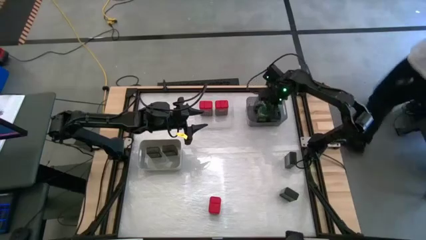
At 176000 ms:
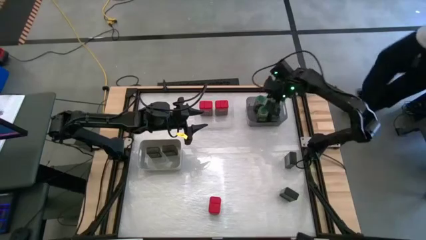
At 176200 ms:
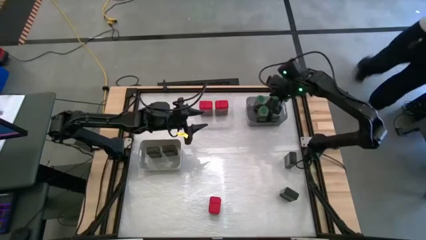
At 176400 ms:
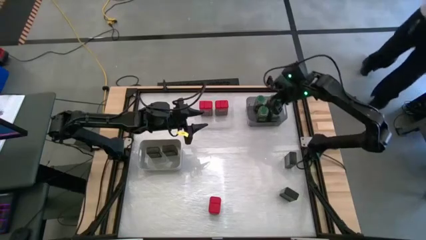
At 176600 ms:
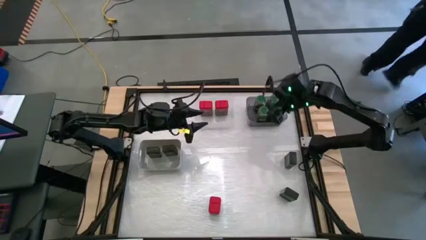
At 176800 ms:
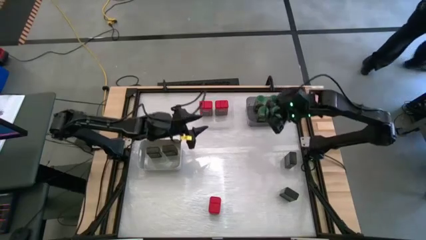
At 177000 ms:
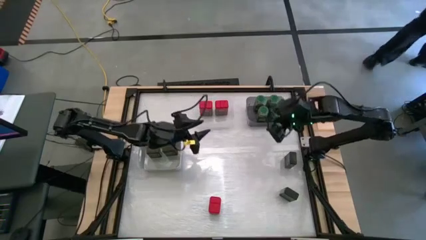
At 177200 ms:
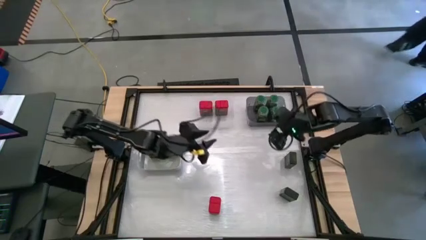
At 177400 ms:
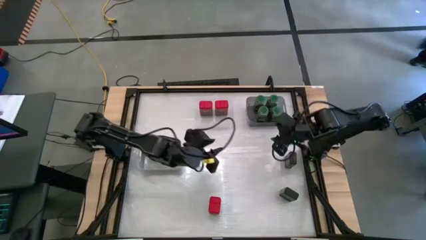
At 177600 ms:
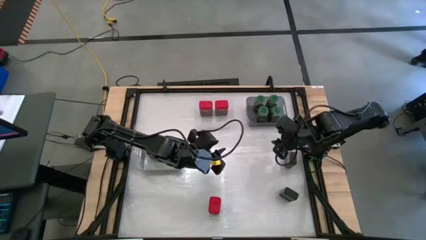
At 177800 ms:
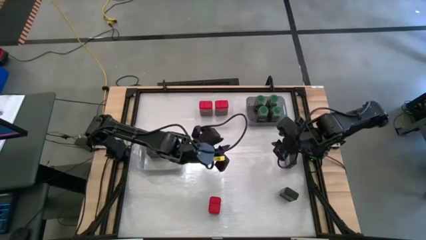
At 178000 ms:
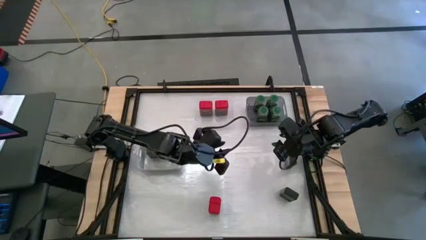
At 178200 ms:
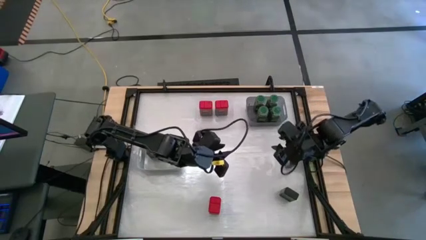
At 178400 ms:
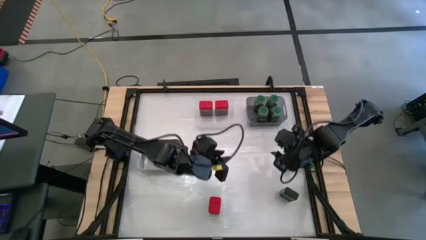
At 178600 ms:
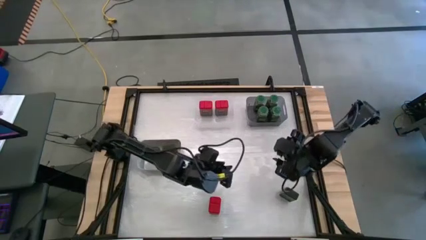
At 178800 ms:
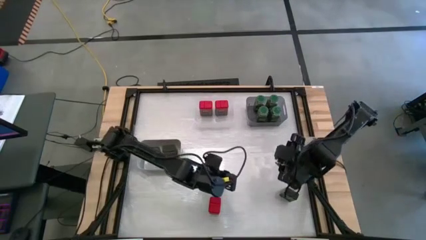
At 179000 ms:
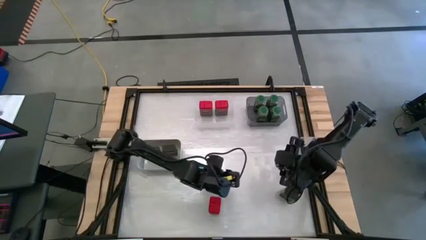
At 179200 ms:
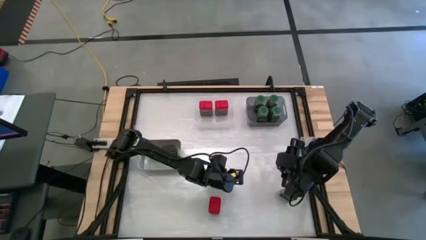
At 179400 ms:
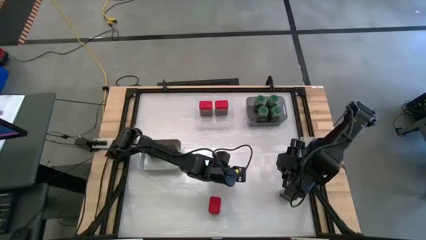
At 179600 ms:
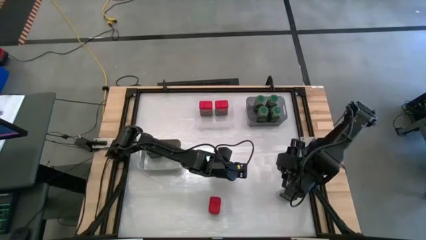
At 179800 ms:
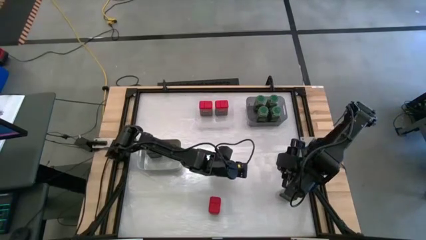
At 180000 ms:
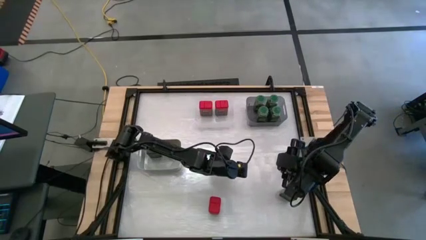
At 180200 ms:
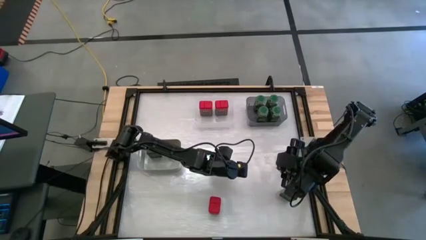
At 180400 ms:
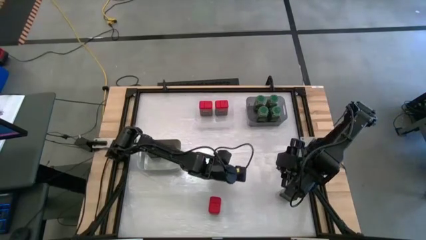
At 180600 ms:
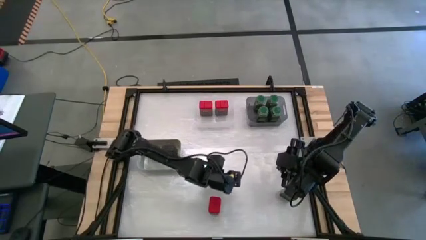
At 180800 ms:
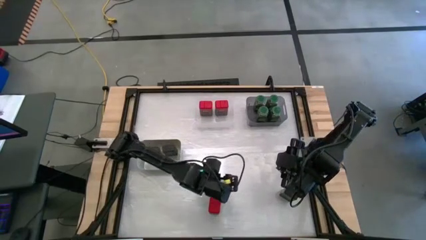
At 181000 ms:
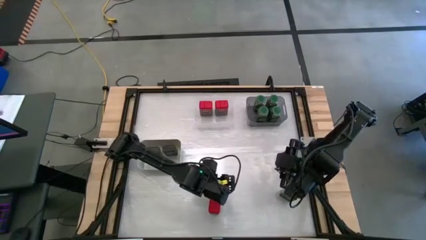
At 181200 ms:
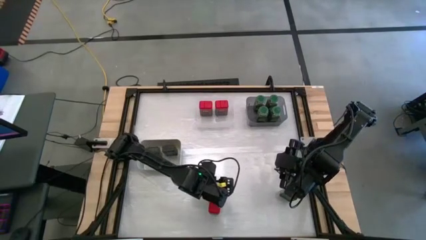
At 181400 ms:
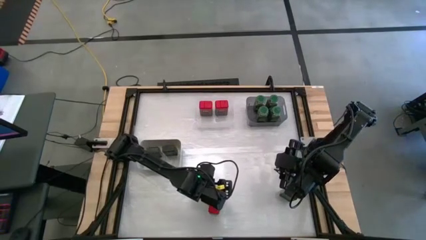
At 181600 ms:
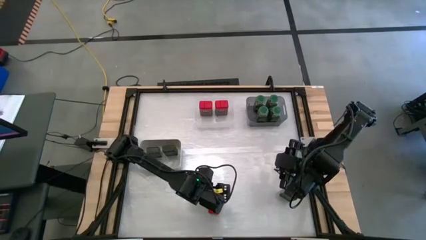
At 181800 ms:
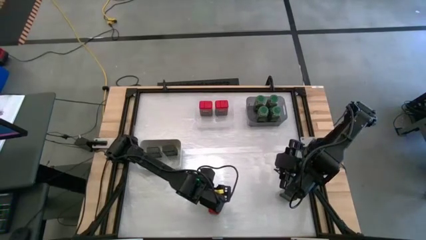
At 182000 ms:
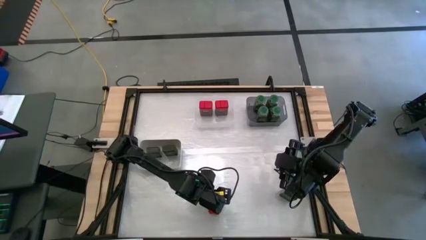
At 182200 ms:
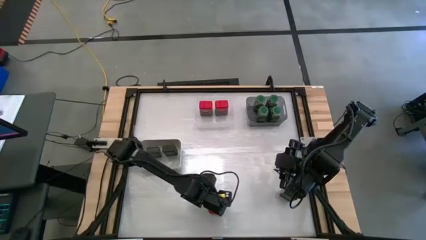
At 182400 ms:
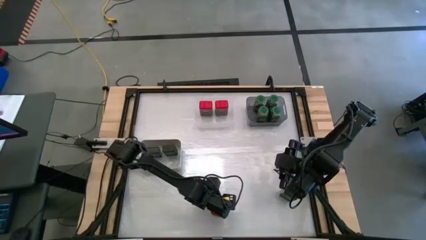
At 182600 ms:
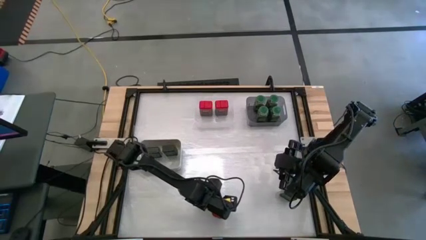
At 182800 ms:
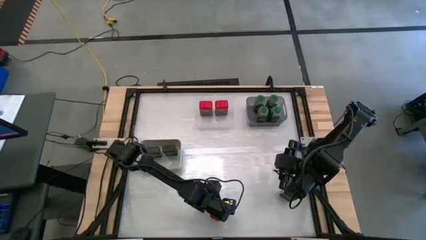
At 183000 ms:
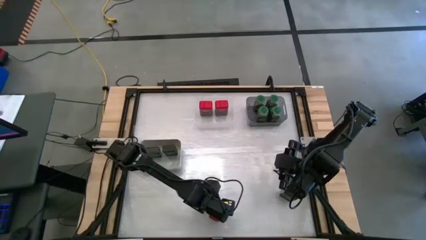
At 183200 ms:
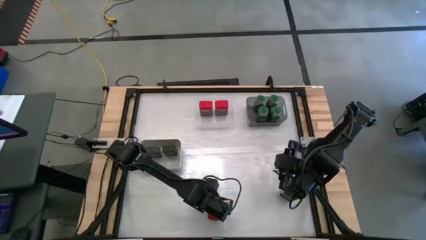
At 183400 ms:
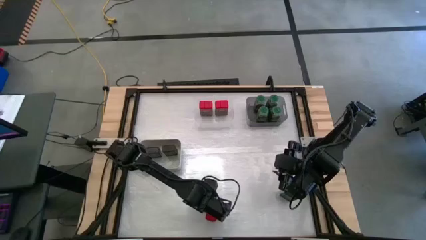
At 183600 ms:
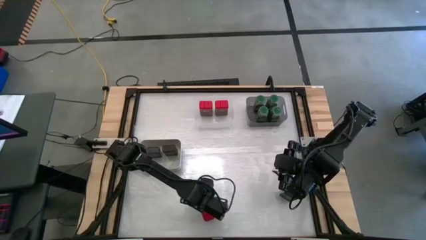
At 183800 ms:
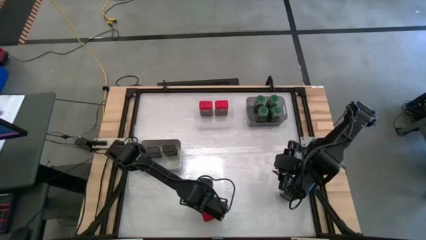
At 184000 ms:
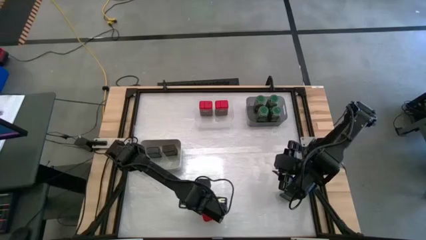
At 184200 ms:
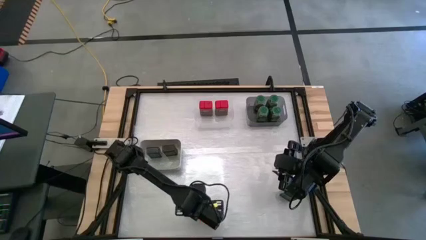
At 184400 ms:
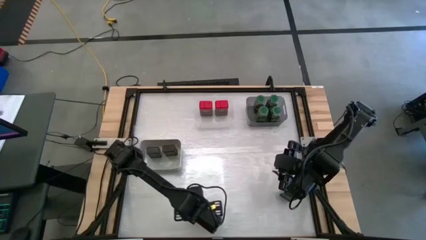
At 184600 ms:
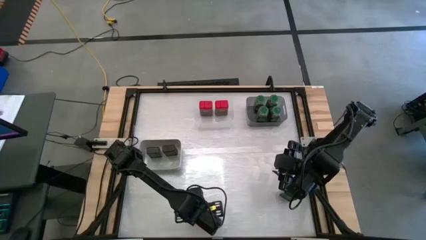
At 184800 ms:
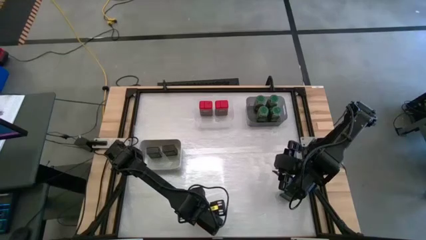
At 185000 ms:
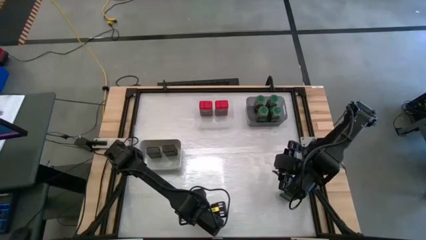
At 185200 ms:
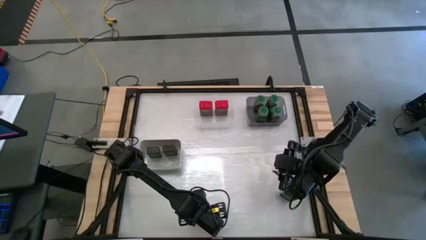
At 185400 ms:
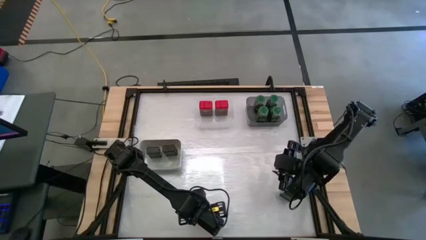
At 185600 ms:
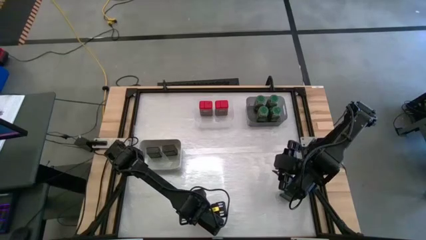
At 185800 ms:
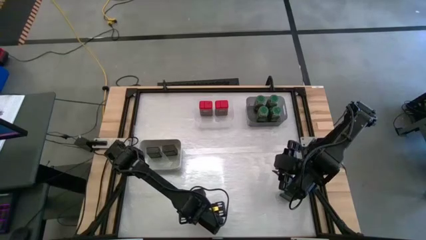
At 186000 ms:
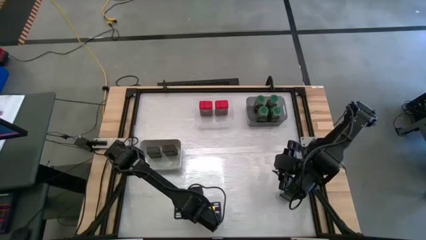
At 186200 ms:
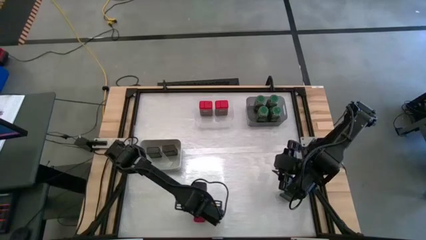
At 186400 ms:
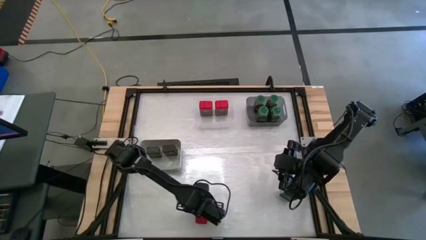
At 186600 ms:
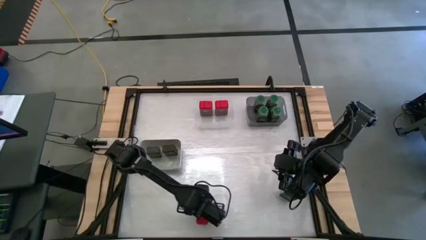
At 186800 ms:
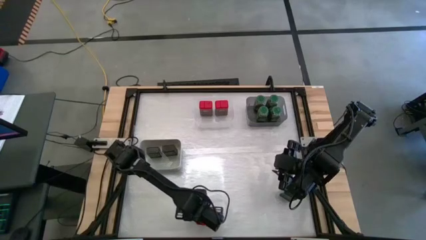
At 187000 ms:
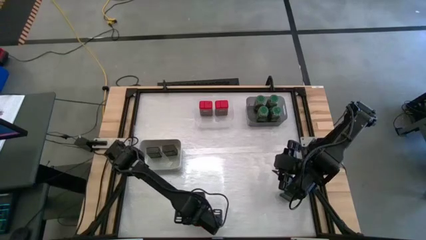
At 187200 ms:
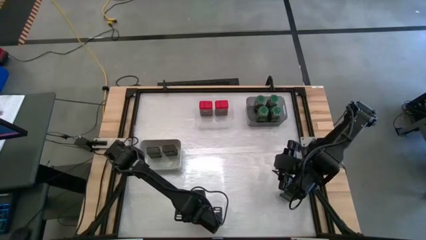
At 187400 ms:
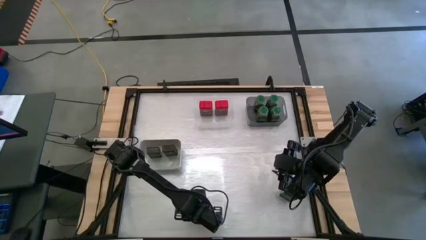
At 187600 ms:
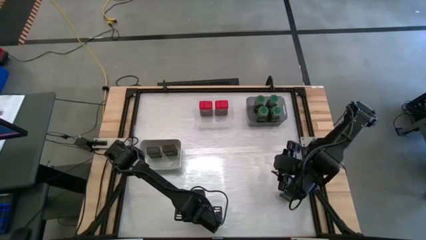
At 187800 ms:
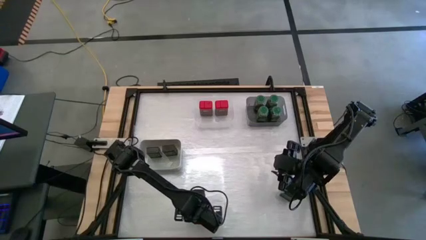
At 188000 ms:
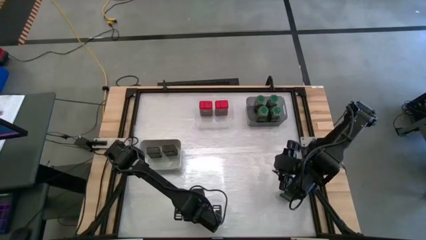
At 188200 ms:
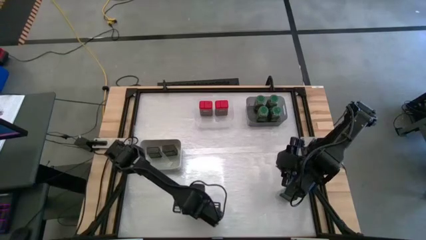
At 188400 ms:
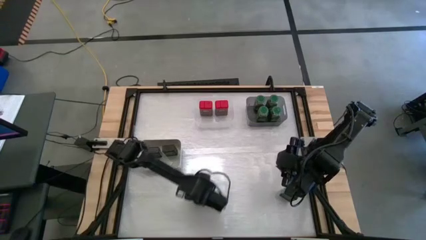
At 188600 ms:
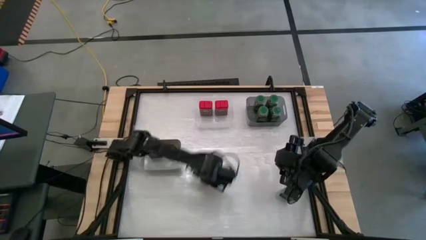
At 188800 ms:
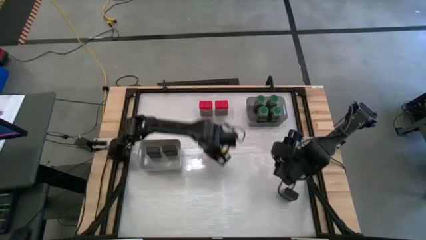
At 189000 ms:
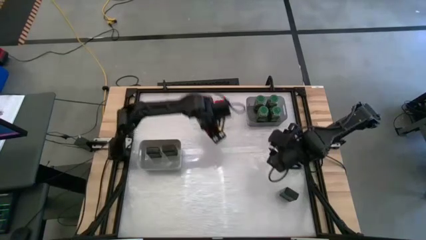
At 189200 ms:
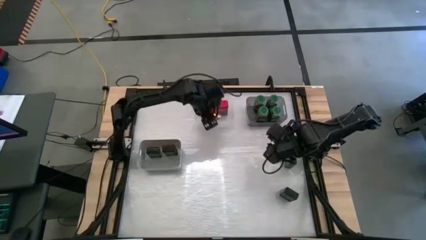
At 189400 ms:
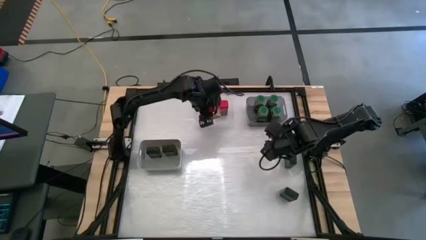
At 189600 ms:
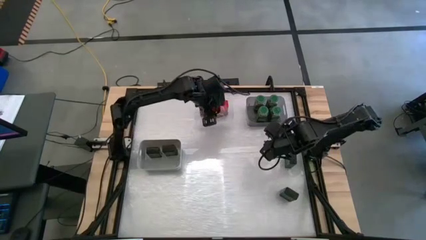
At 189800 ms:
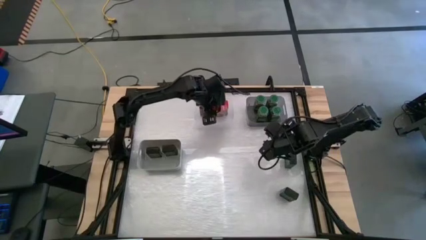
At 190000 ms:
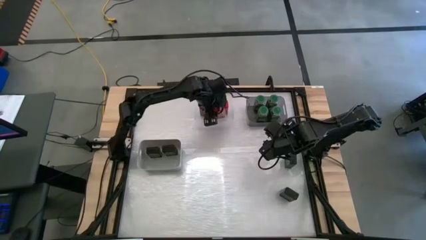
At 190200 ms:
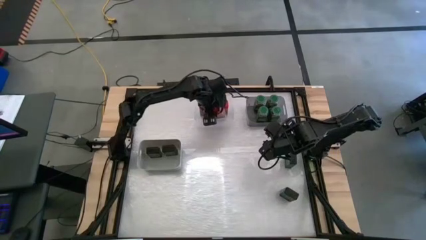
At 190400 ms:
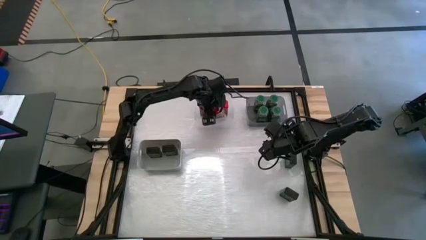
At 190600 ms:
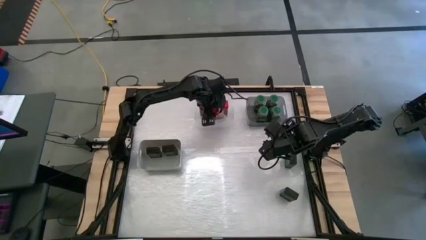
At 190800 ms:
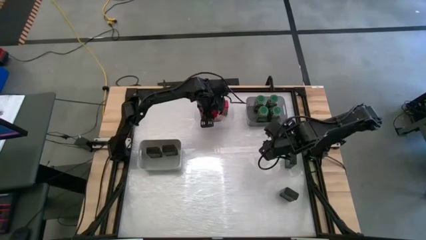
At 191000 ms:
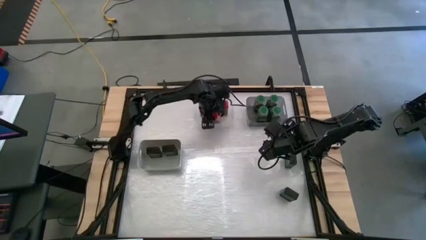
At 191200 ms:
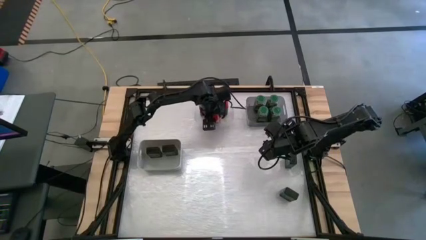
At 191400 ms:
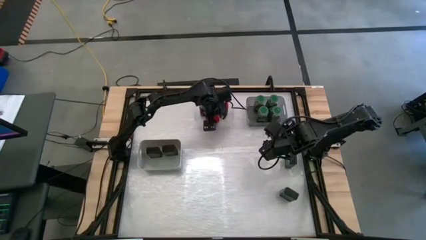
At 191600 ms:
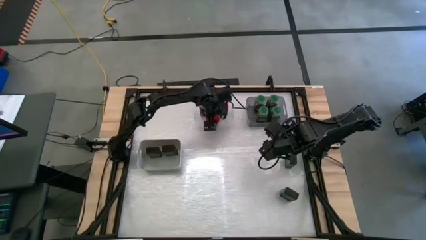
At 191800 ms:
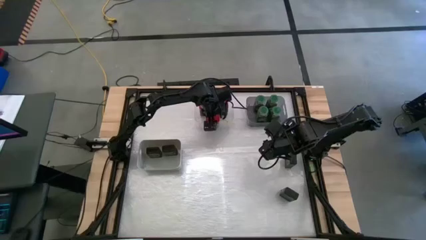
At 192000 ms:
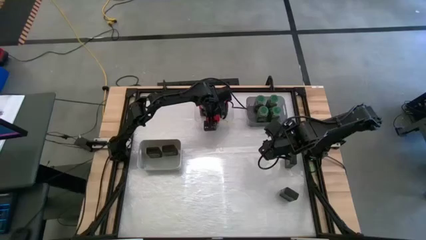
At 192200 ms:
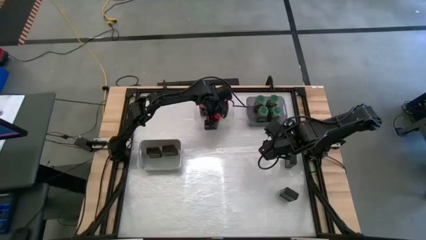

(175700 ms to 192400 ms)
Task: Sort spices by type
Put the red seasoning can into the transparent bin
